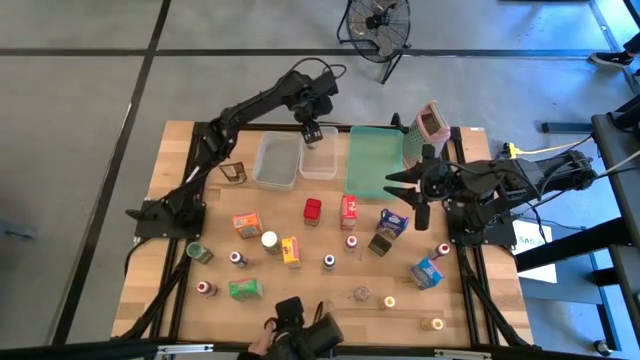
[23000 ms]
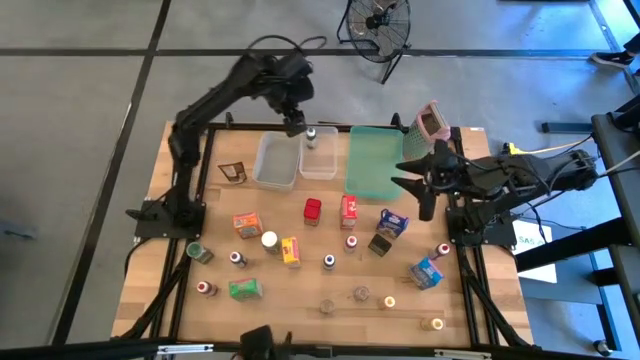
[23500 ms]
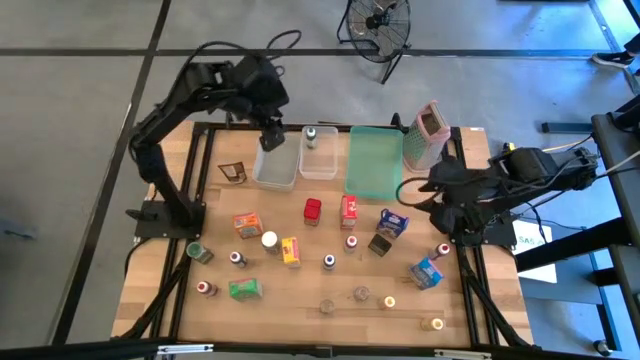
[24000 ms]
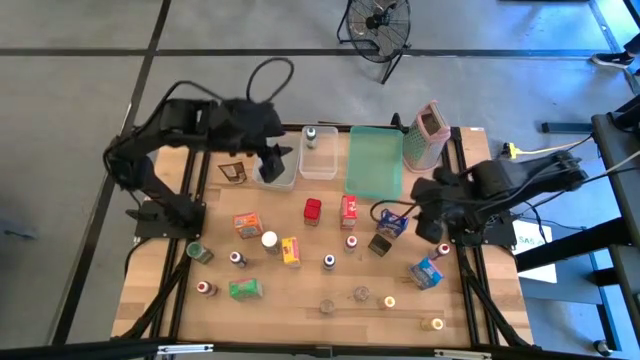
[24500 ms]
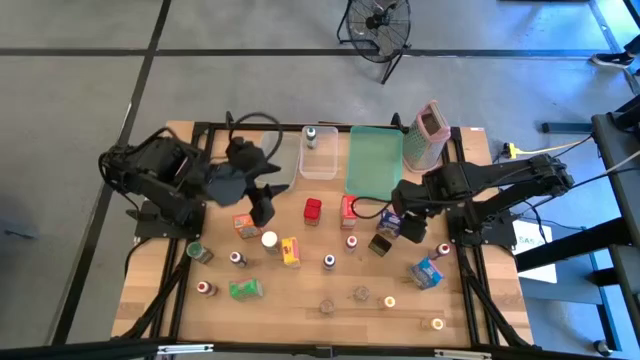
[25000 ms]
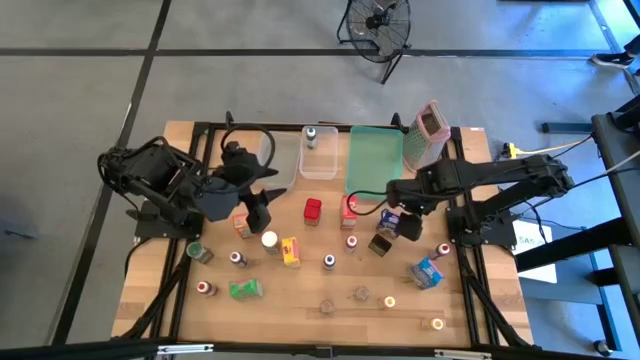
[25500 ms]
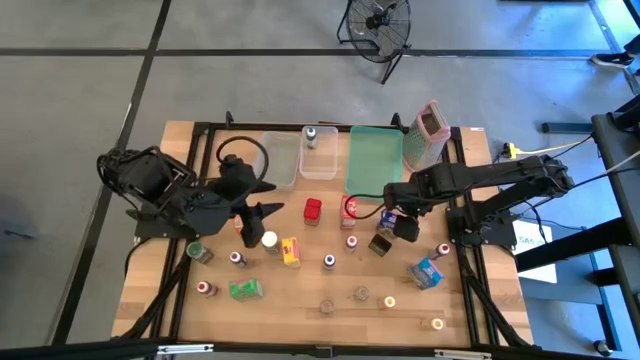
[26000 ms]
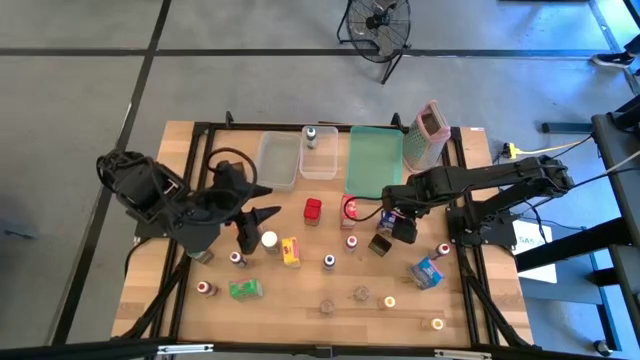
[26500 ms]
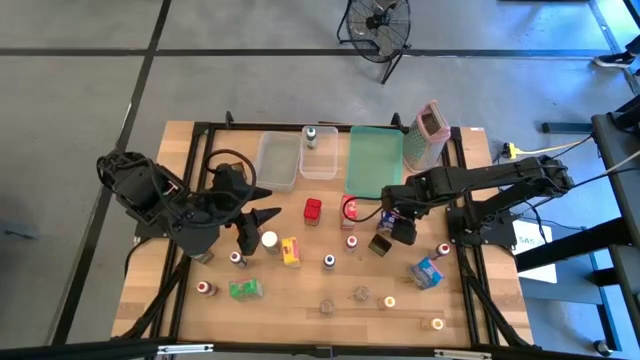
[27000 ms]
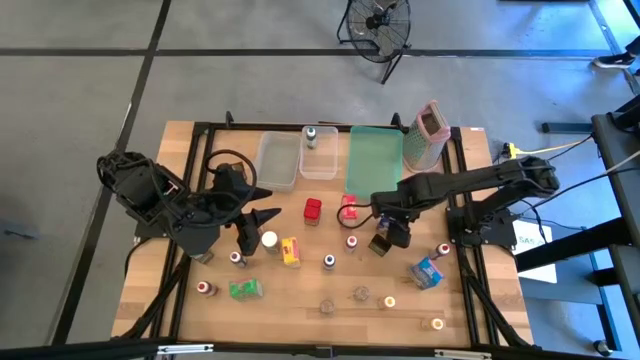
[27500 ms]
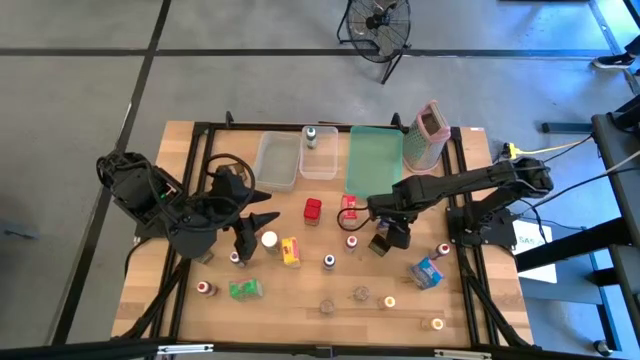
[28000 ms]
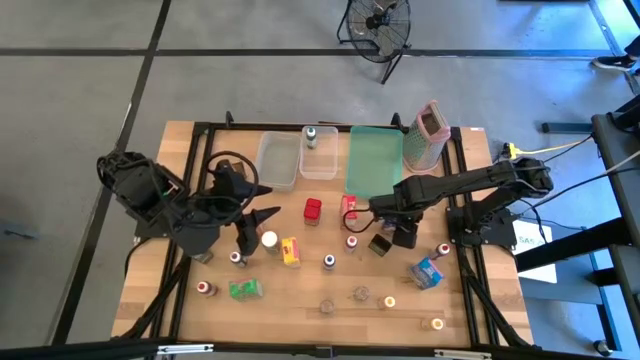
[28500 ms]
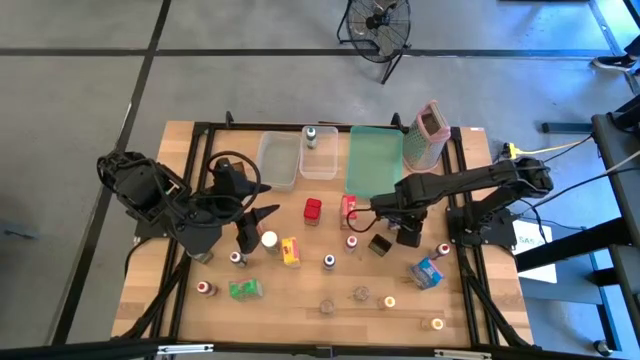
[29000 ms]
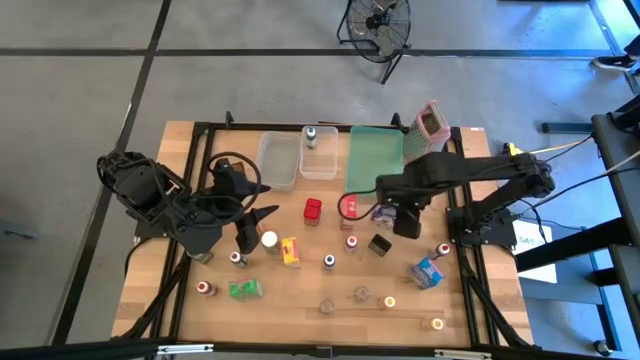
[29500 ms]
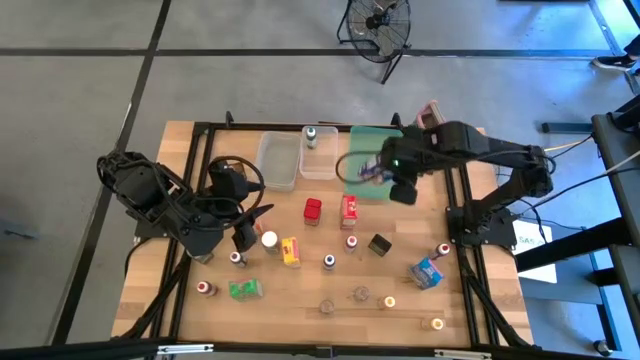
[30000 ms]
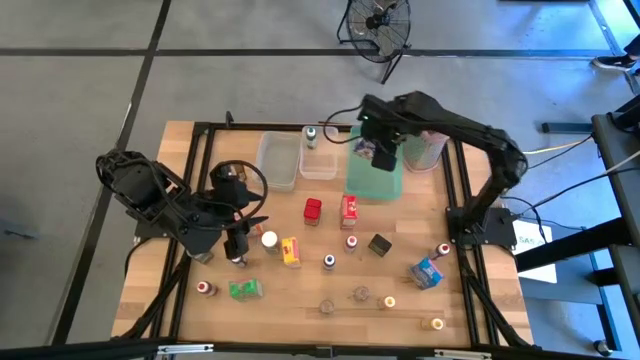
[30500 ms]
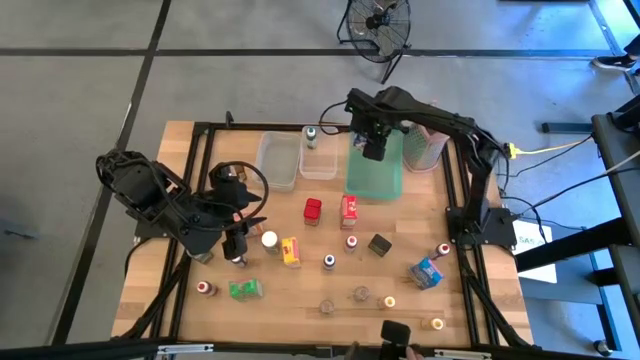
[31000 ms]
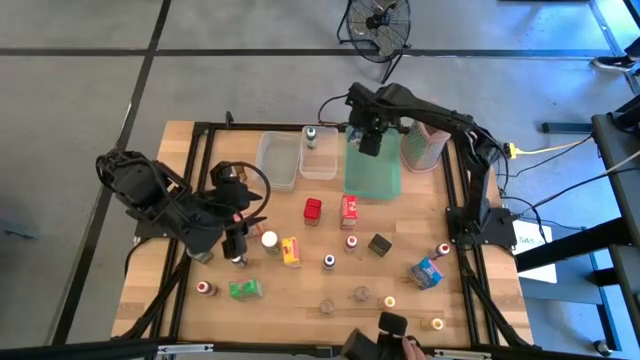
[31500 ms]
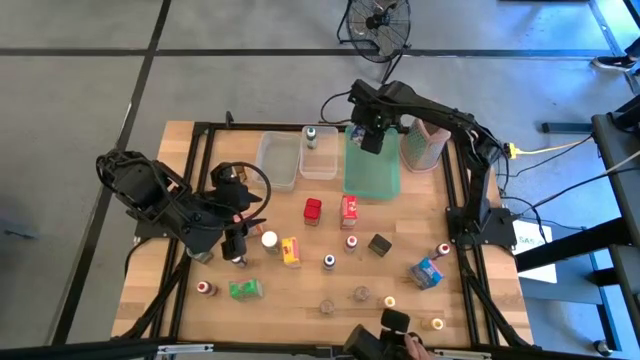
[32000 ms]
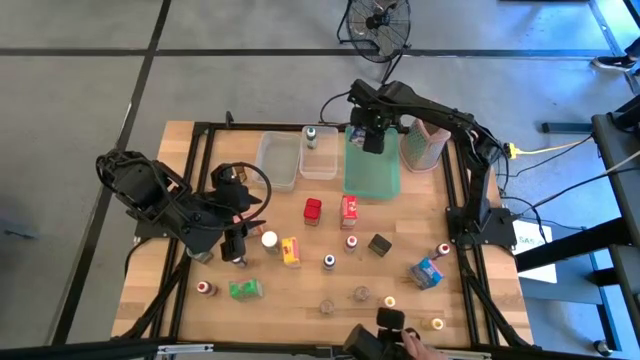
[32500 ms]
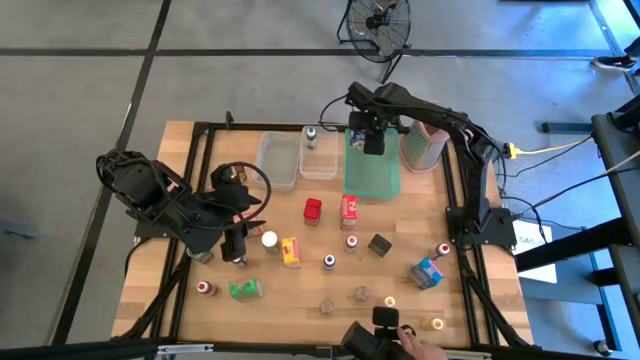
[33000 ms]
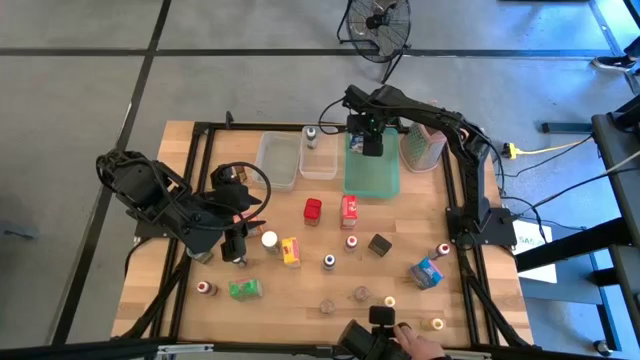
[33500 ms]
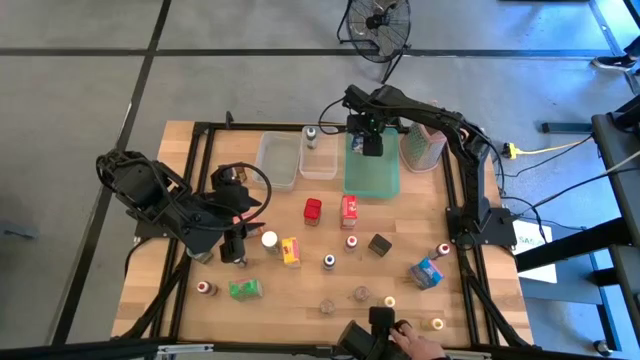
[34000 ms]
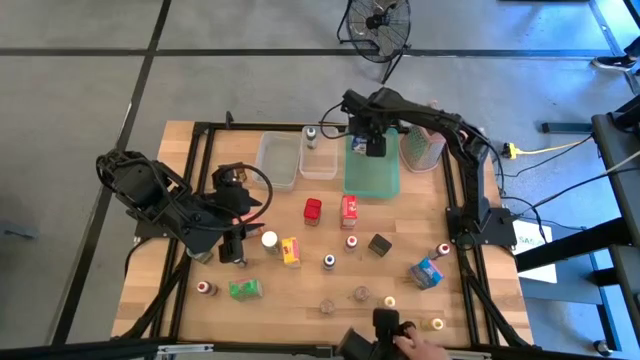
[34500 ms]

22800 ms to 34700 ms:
Task: Pick & Place Kitchen Items
Put the blue cereal box into the green bin

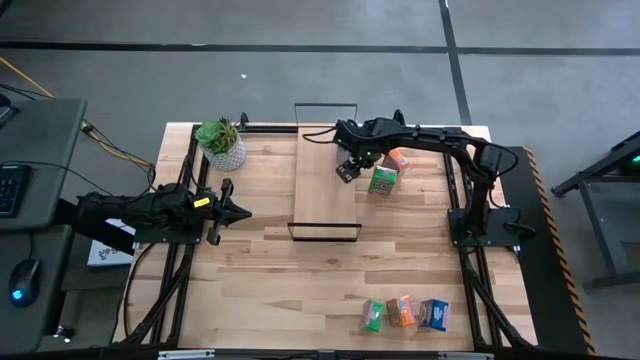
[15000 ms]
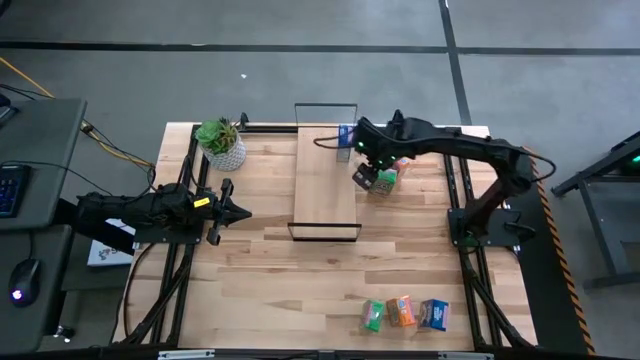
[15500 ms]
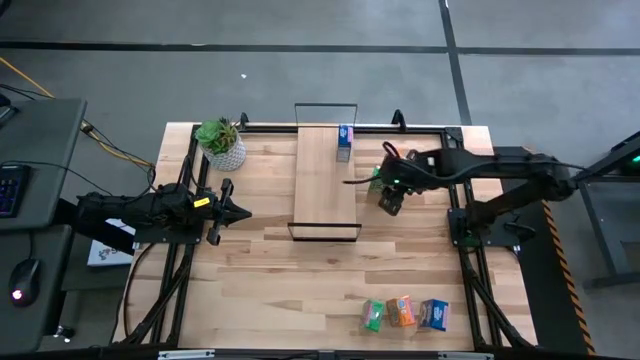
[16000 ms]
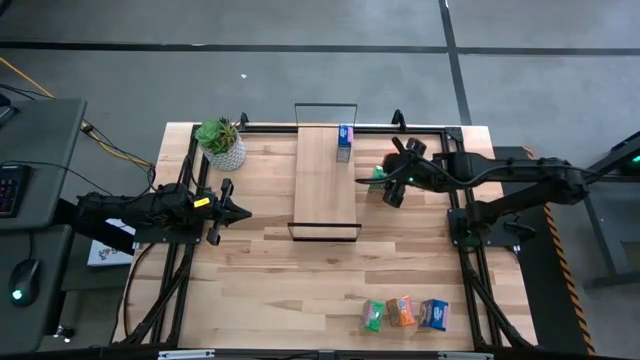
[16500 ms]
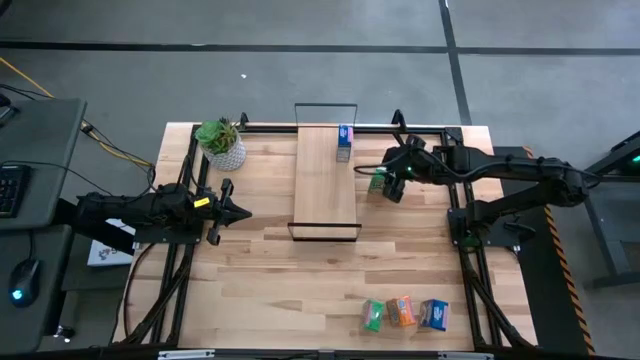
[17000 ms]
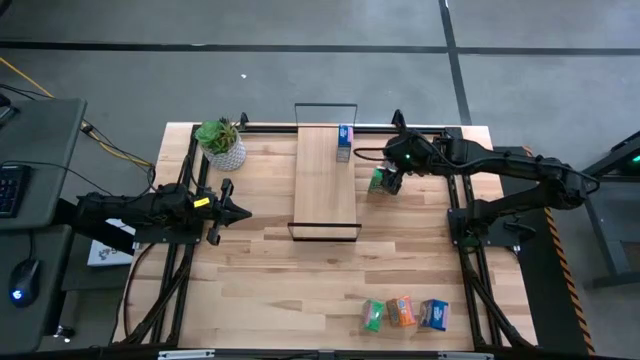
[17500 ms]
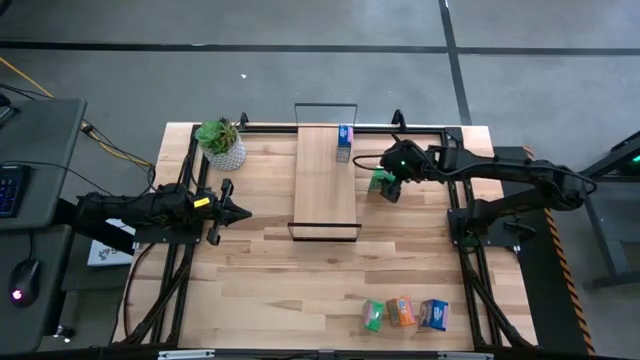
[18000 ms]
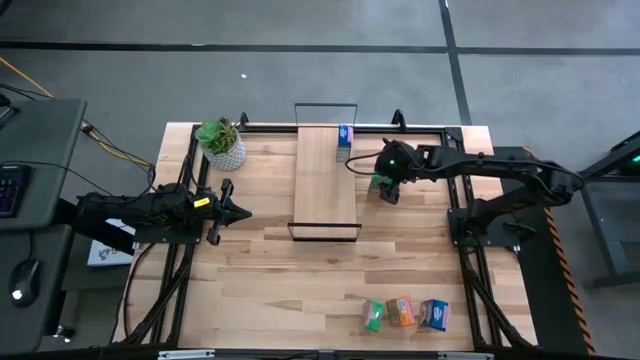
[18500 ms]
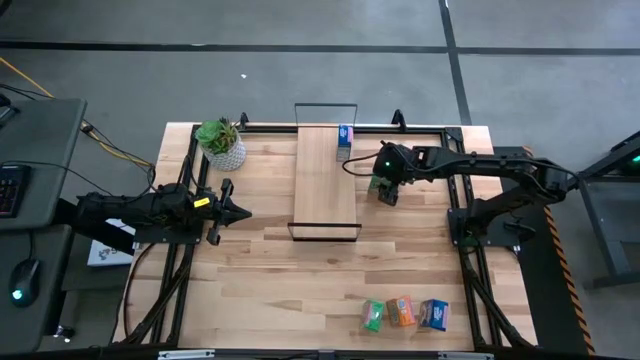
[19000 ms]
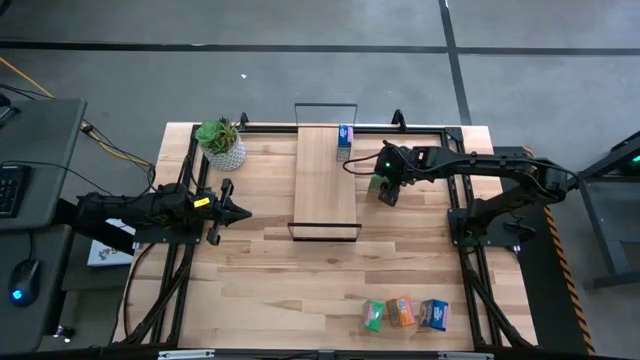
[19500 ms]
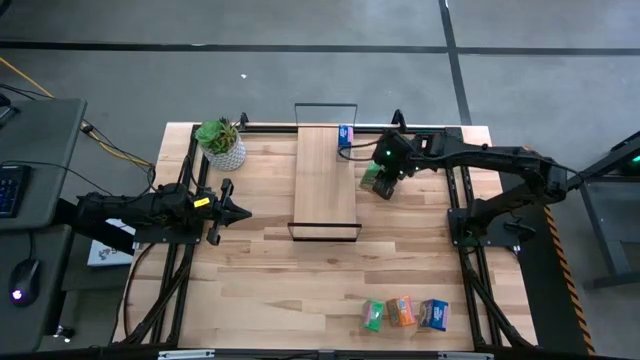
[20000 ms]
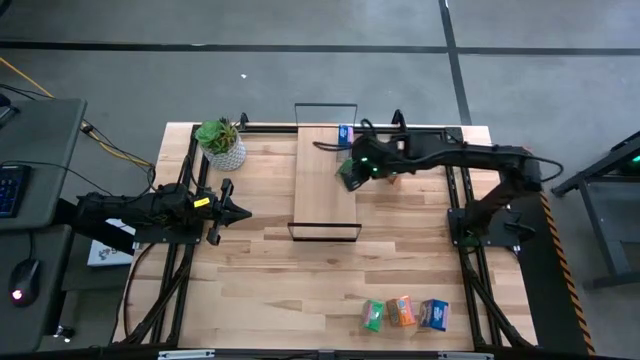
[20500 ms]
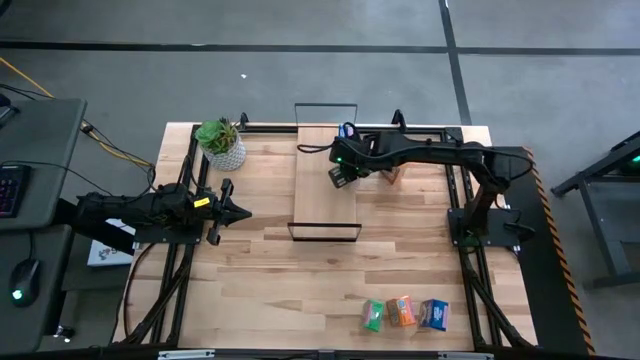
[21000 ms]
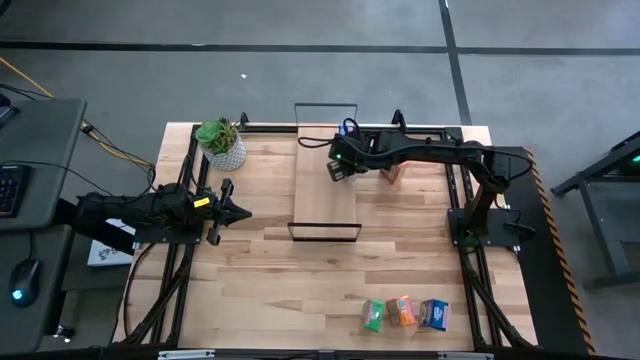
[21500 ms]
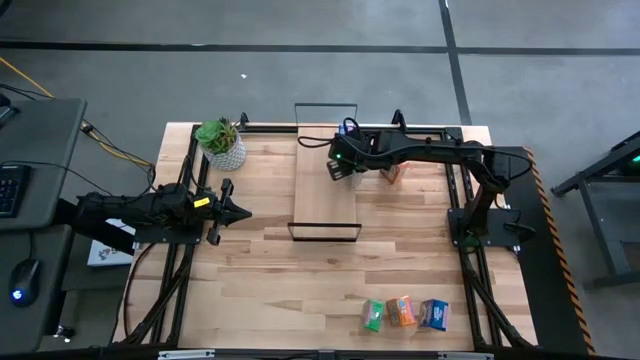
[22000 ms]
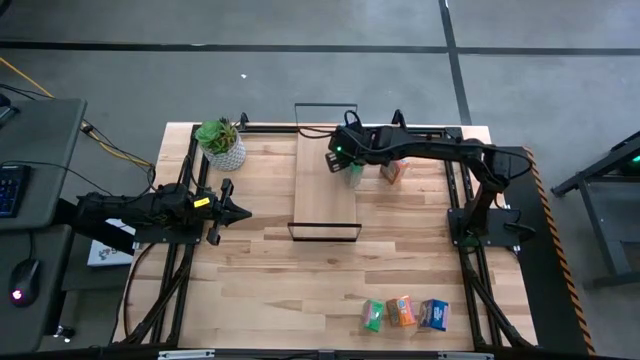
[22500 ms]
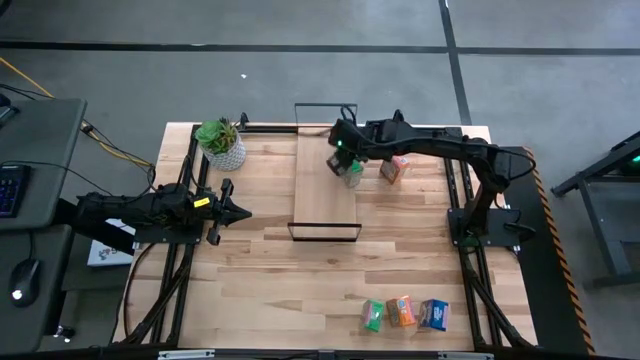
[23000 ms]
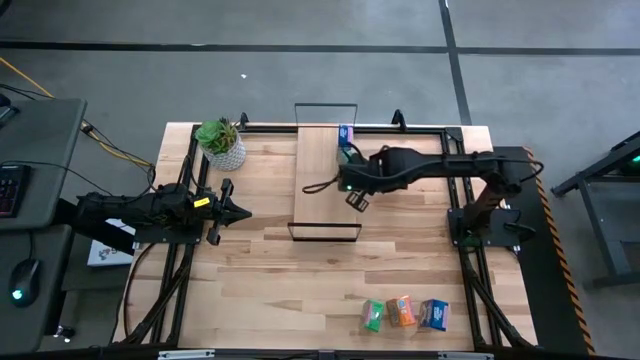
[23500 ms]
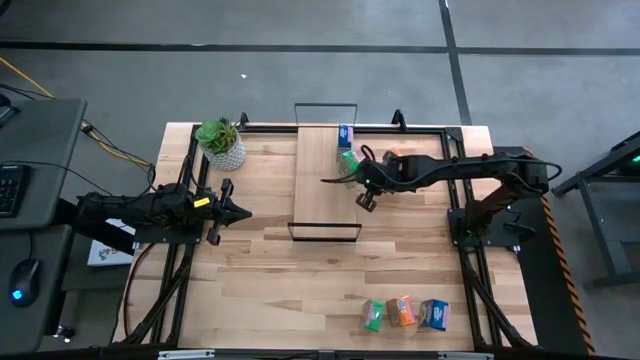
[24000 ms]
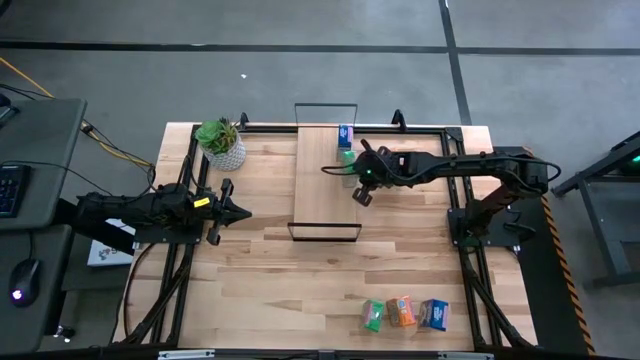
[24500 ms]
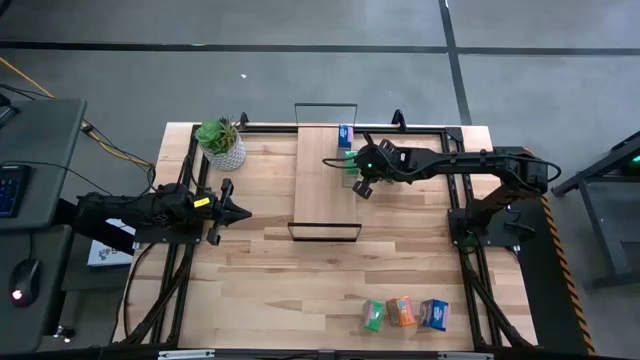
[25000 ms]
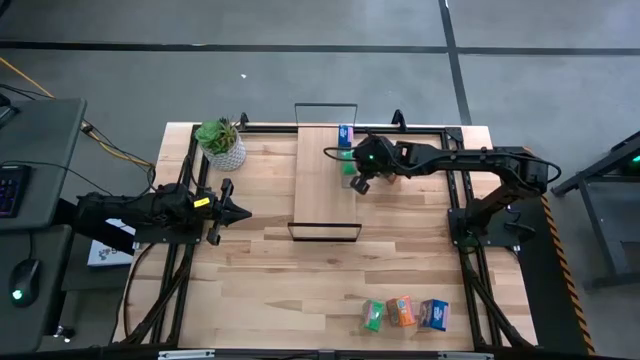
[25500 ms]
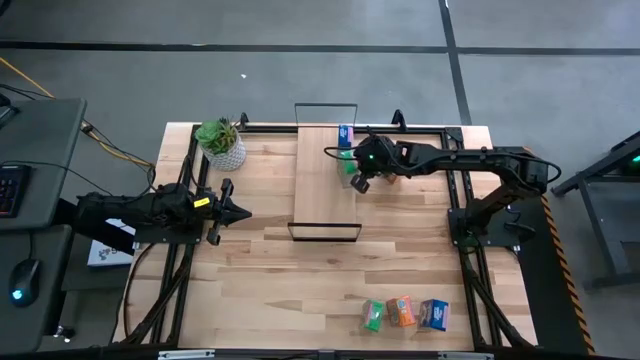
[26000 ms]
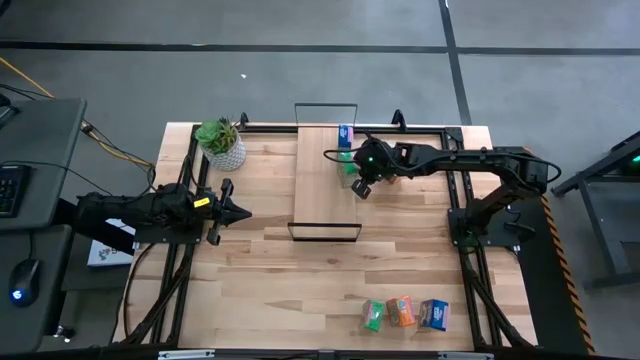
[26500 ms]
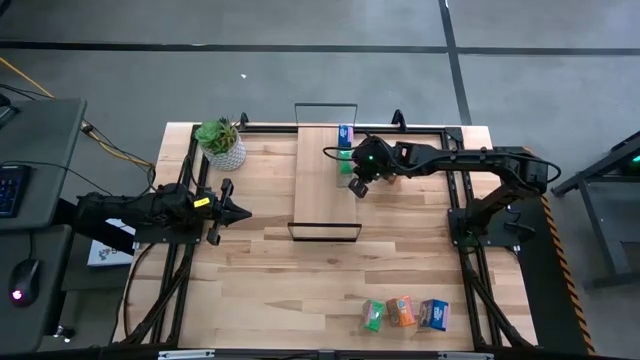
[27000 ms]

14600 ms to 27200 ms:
Task: Stack cereal on shelf
Put the top green cereal box on the shelf
